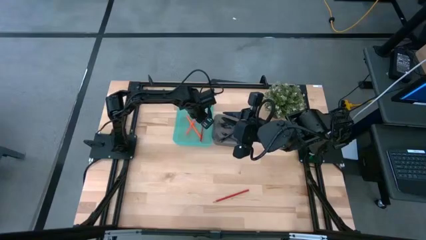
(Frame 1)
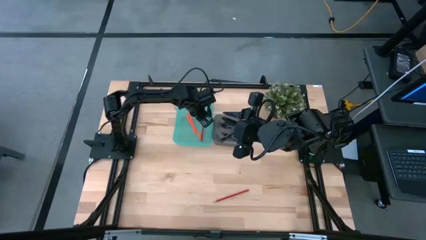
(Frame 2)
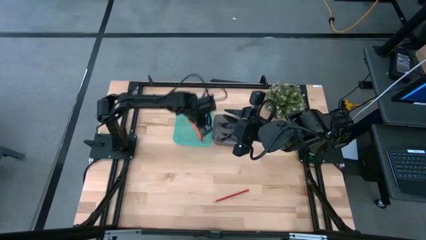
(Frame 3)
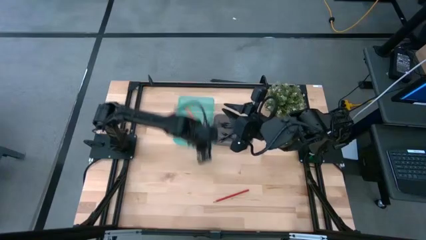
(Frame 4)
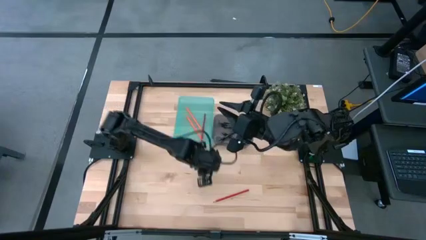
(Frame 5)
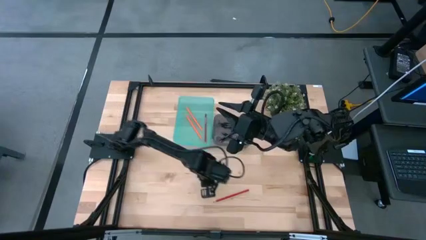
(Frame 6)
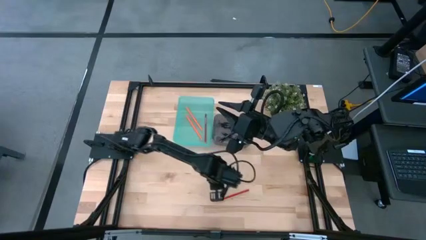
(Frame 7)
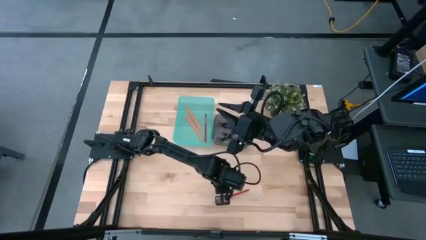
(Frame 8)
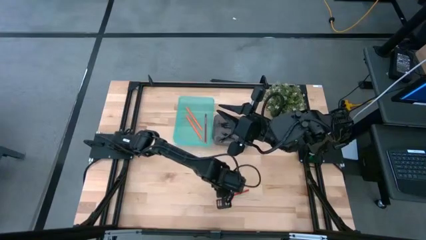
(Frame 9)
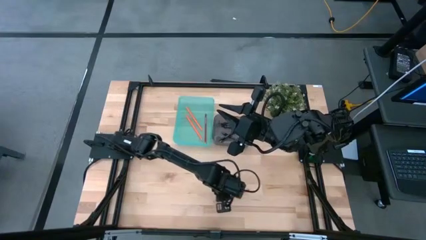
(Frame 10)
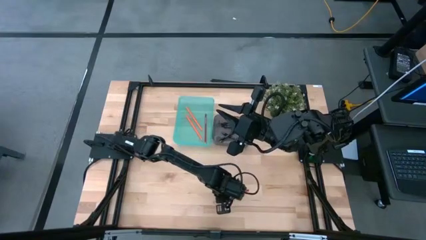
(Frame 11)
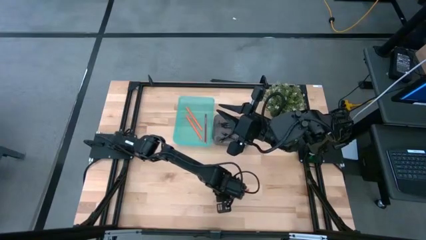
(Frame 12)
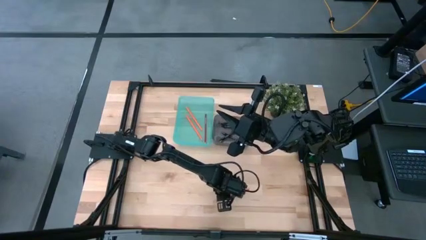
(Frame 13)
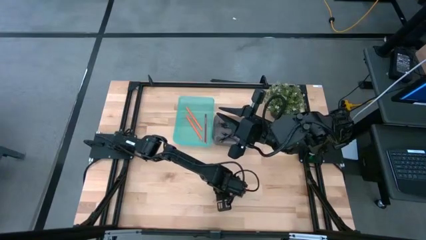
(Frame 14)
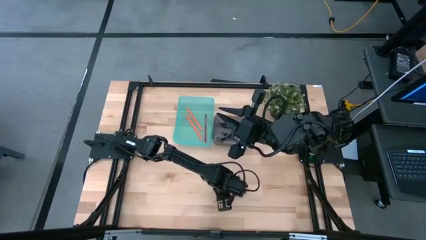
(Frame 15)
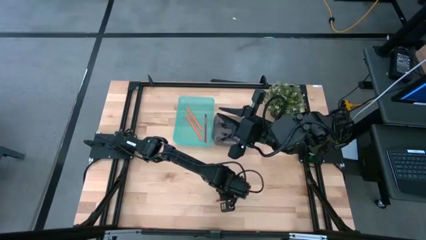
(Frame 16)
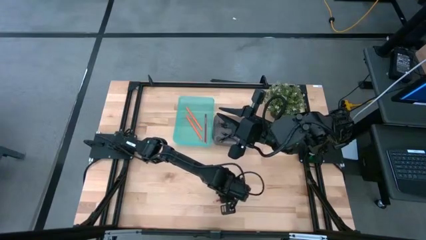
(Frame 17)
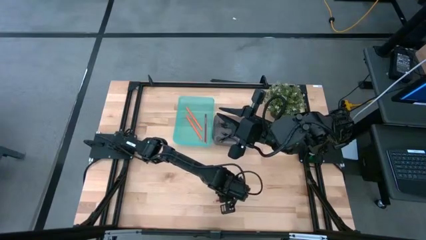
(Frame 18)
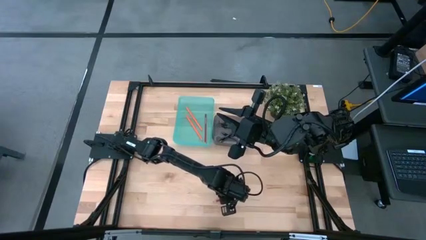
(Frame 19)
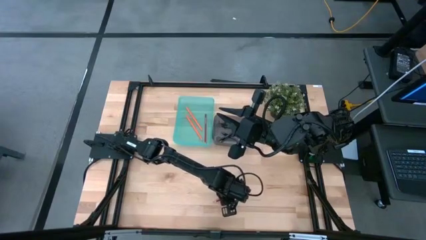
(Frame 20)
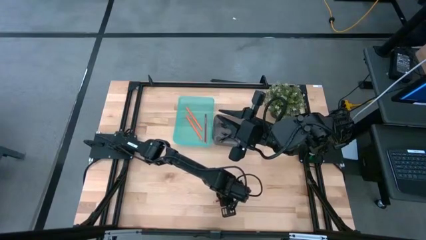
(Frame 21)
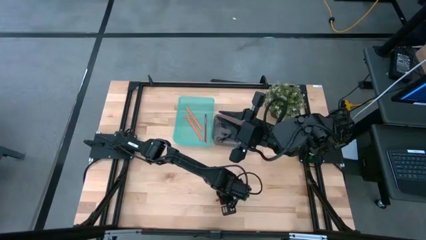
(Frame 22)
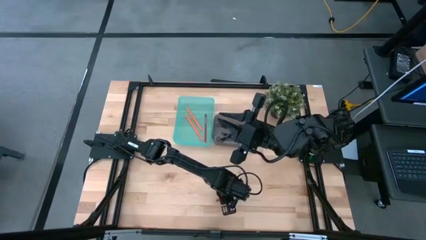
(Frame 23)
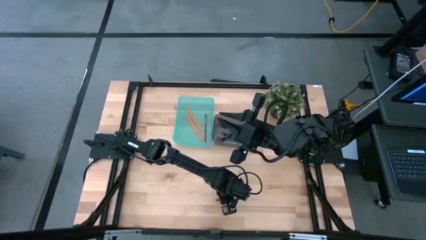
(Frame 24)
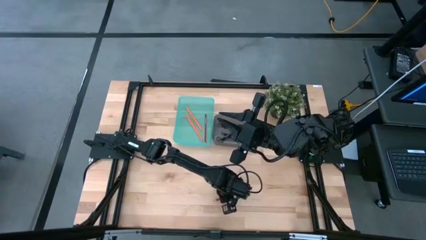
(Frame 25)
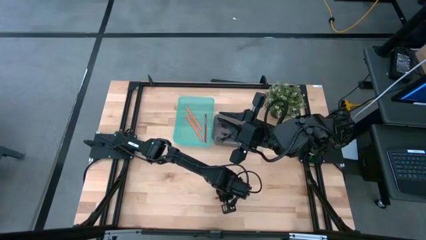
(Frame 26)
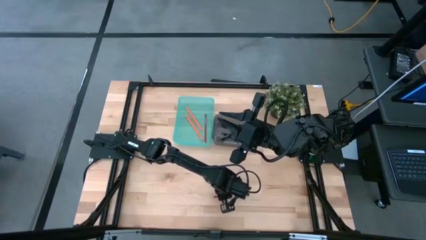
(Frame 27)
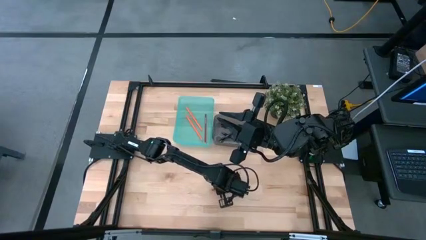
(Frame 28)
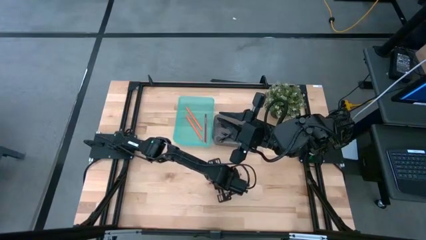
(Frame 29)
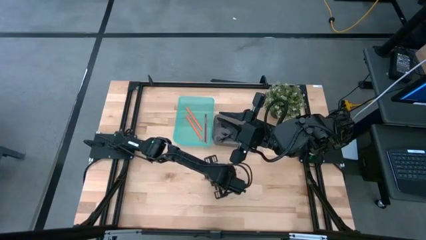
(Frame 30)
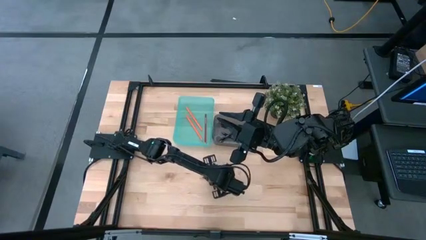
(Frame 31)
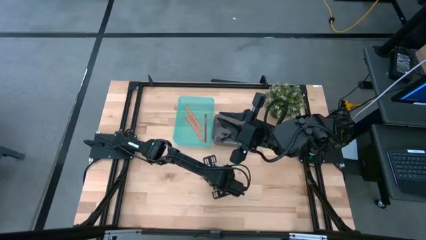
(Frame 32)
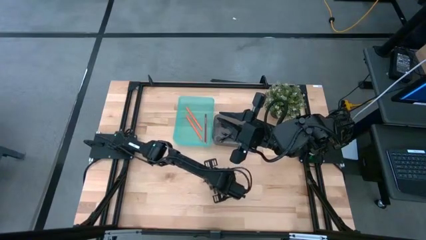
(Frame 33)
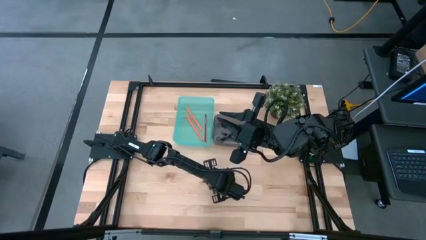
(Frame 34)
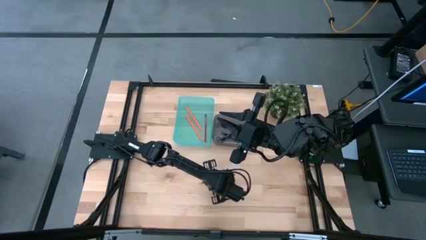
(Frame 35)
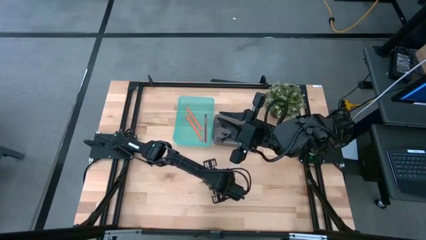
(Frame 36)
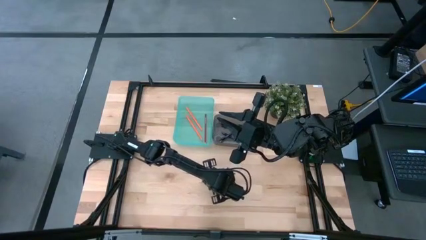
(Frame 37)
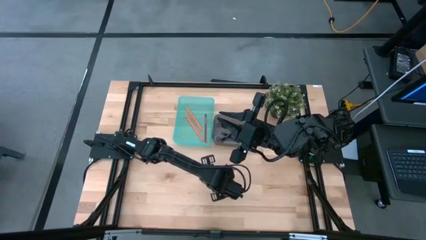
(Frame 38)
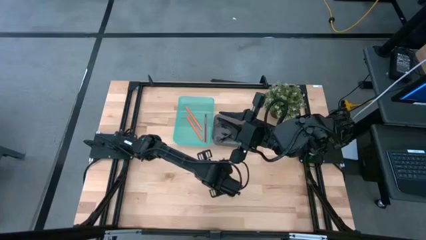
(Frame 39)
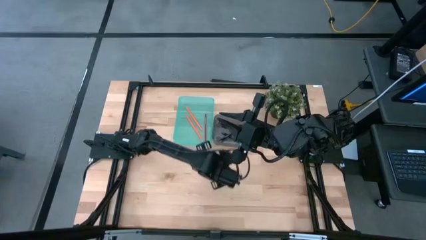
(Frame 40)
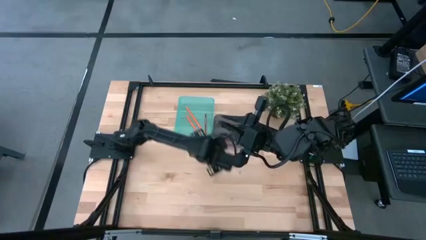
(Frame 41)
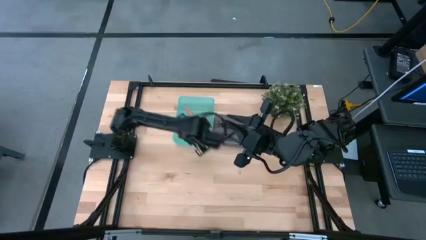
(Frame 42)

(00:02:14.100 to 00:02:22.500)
Task: Sort pens & pencils
Put the red colored pencil into the green bin

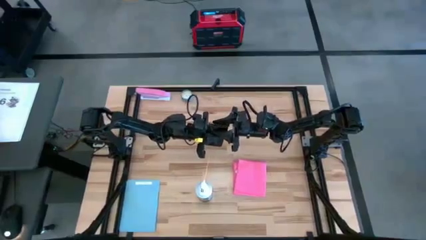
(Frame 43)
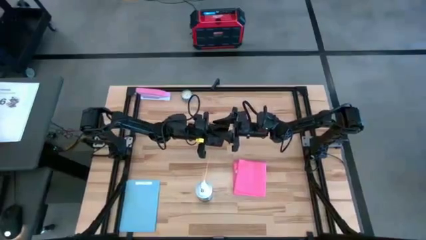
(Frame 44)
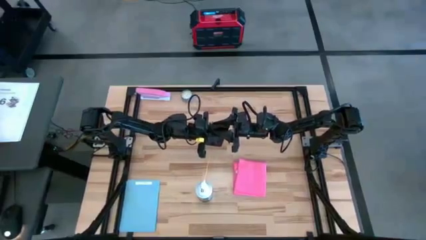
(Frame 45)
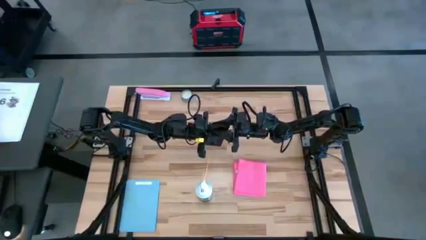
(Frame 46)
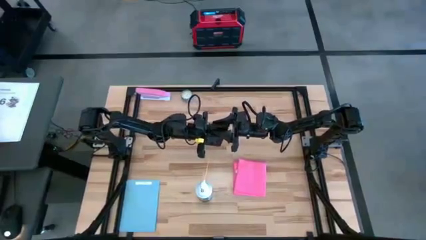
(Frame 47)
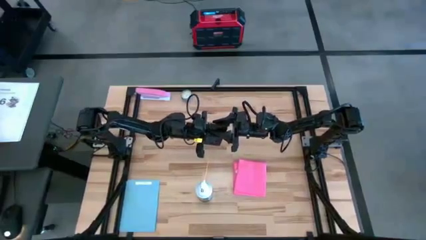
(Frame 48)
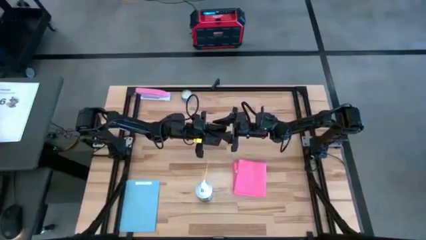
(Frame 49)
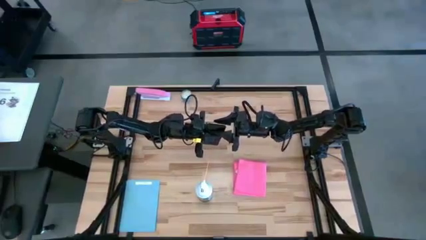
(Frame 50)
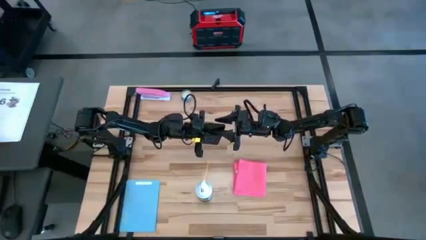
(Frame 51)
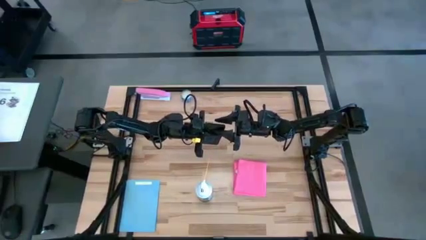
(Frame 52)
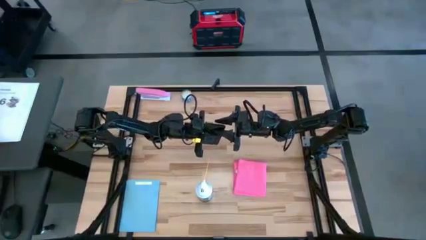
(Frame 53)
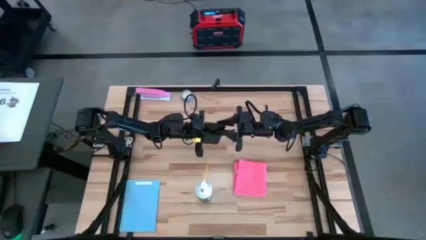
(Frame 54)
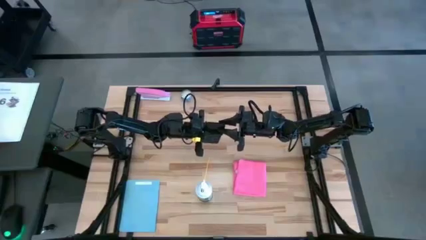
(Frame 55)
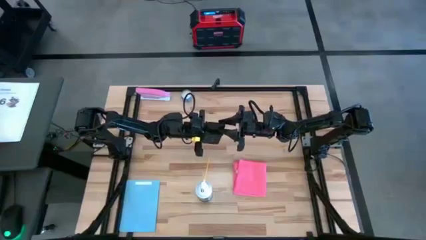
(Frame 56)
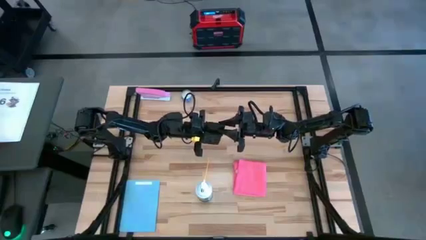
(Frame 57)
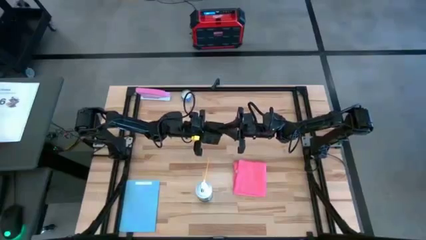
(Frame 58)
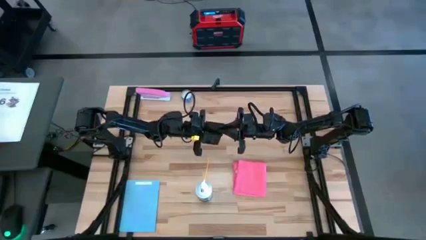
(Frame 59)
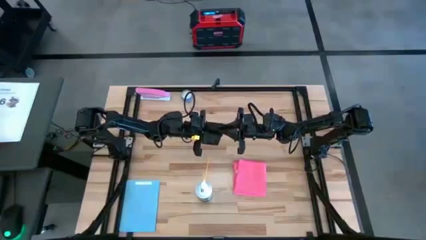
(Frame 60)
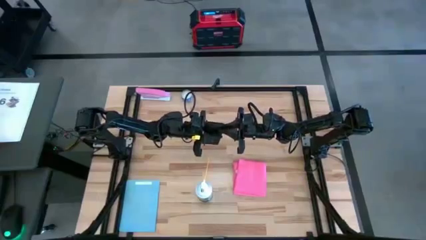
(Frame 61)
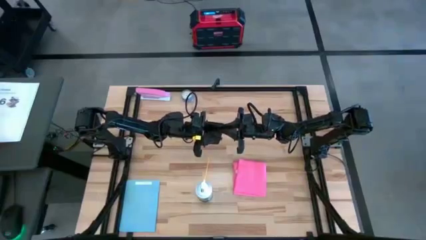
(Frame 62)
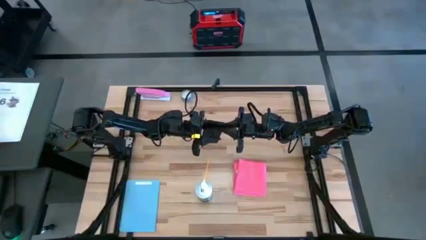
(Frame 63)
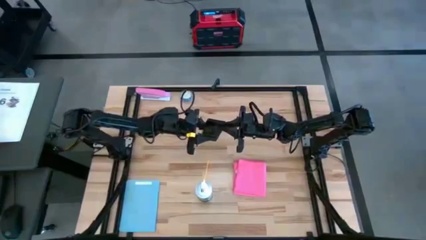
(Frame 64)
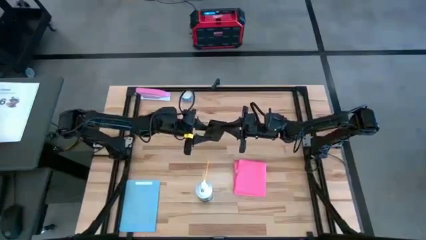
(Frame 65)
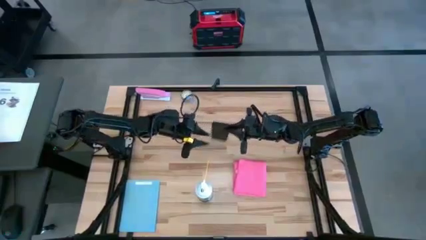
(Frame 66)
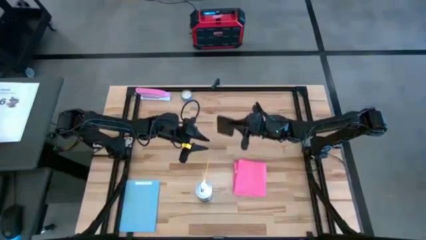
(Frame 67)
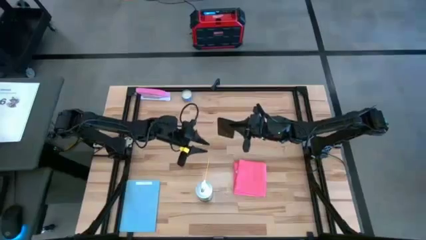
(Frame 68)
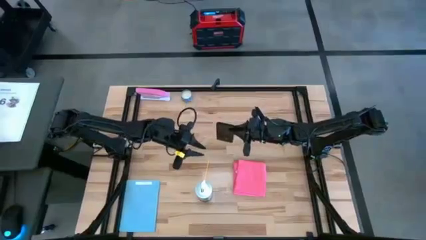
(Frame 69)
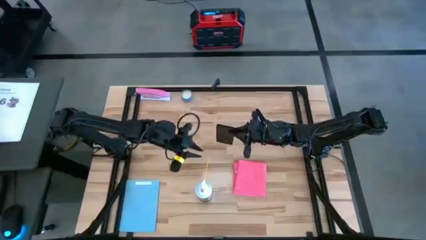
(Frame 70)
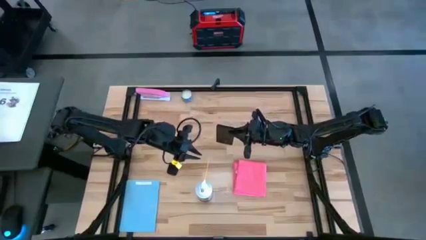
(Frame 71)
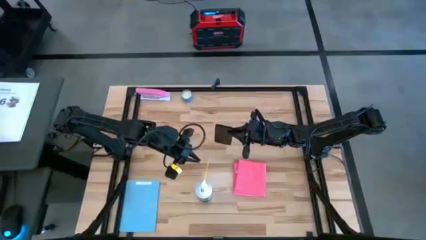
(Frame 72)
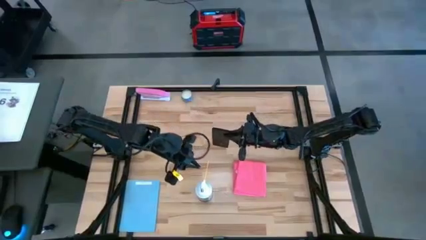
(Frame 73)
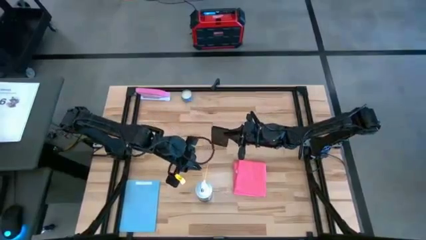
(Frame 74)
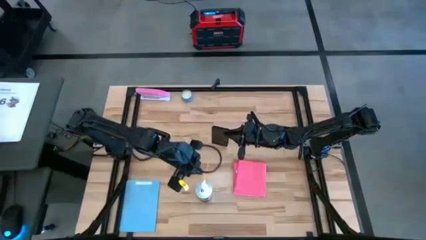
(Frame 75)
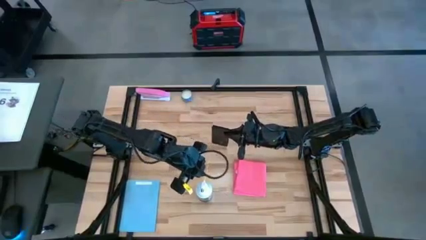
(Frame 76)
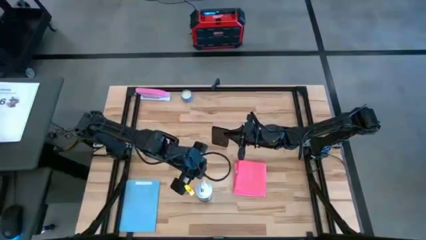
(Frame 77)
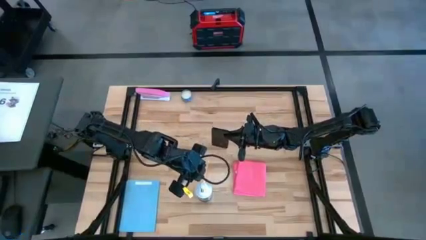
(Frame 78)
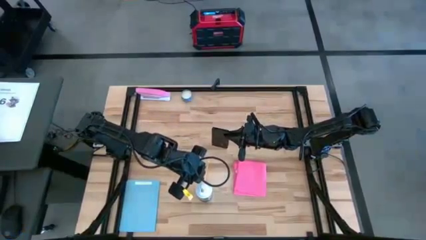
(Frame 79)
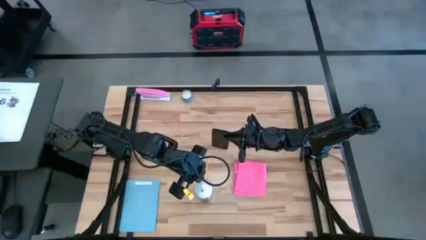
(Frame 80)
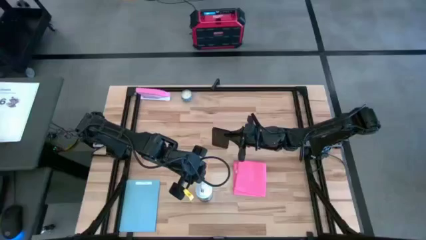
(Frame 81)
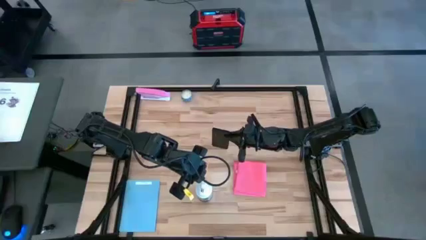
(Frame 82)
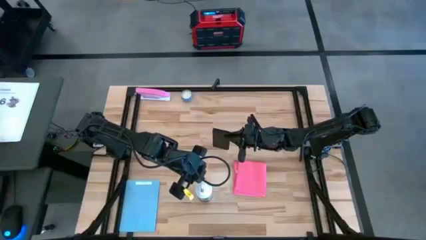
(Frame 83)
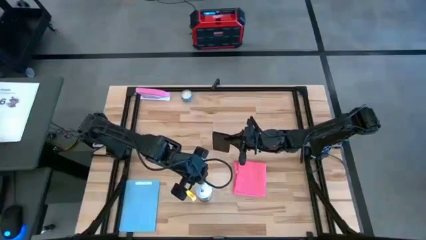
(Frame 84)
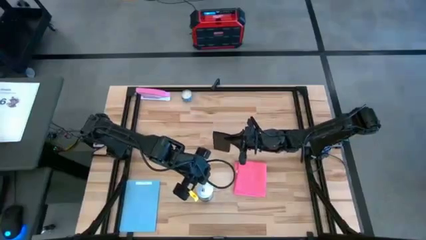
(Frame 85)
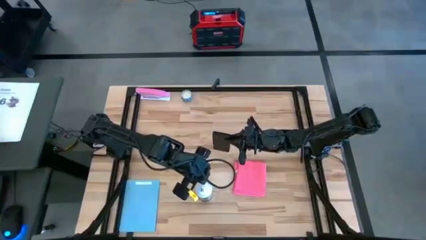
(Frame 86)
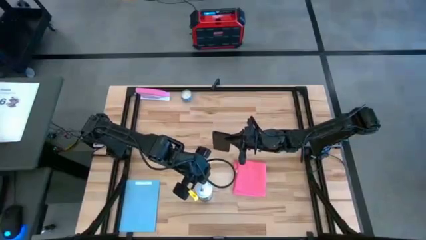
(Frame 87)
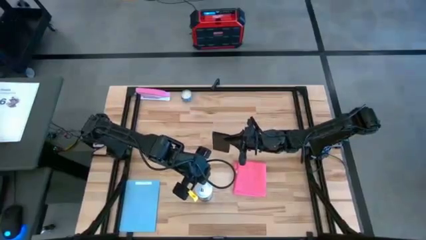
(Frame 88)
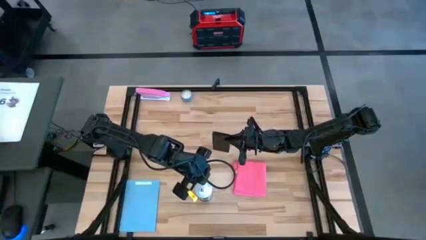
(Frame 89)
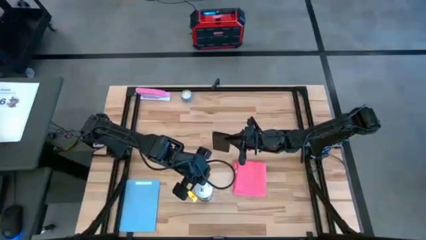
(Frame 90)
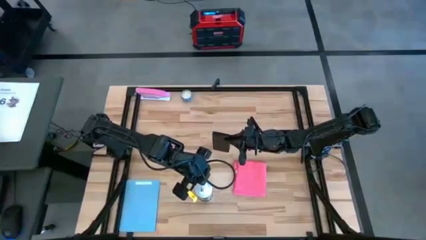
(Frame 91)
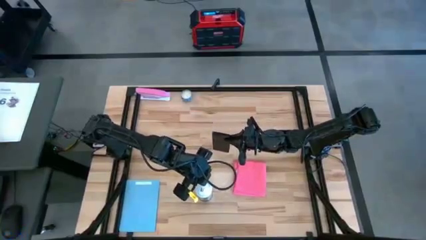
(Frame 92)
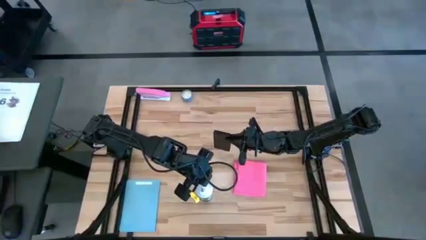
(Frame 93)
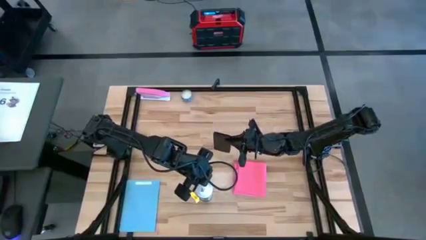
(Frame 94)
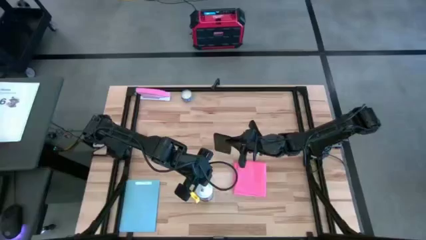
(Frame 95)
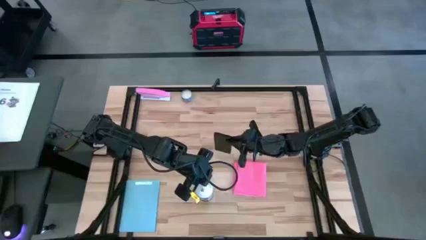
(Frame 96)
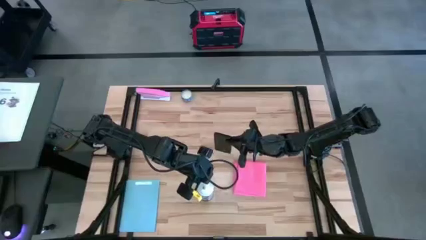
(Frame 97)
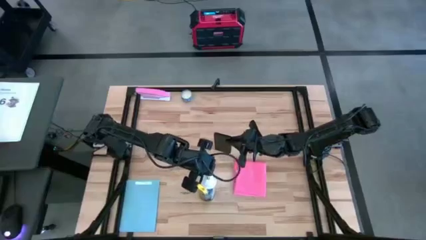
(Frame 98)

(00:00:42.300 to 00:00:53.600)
Task: Apply microfiber cloth
Spray the back of the black cellphone using the spray bottle
